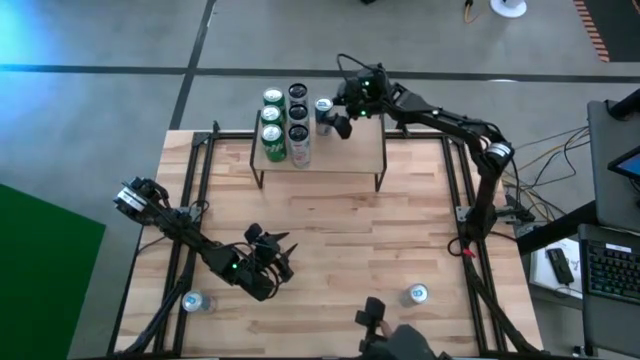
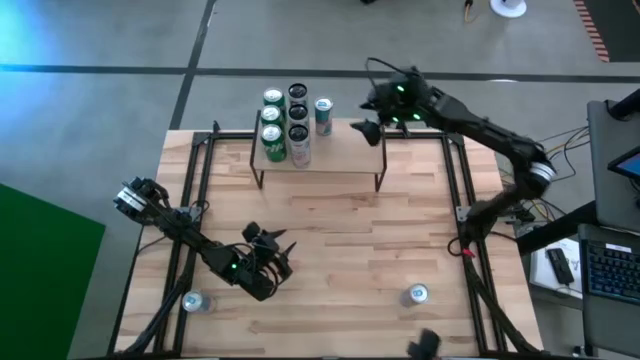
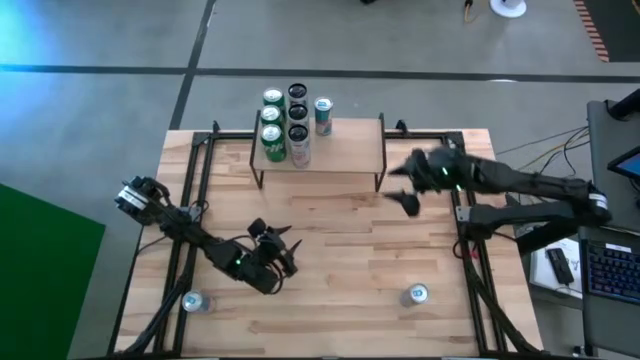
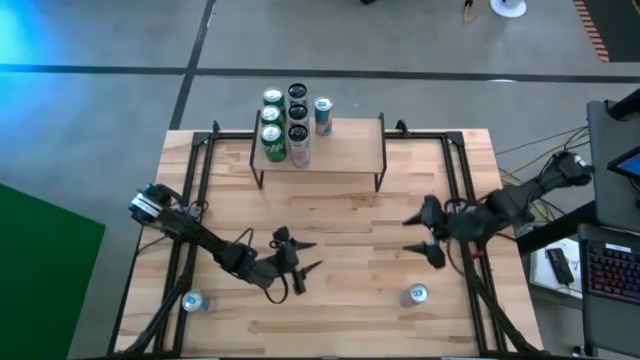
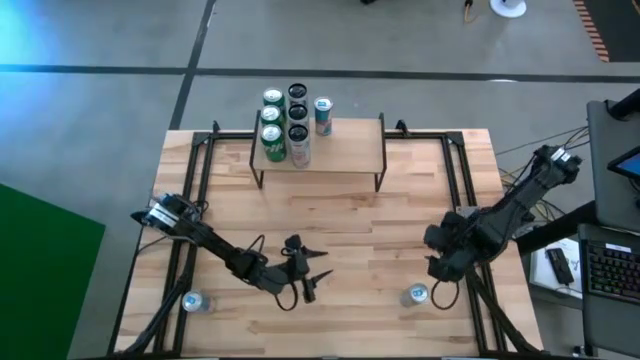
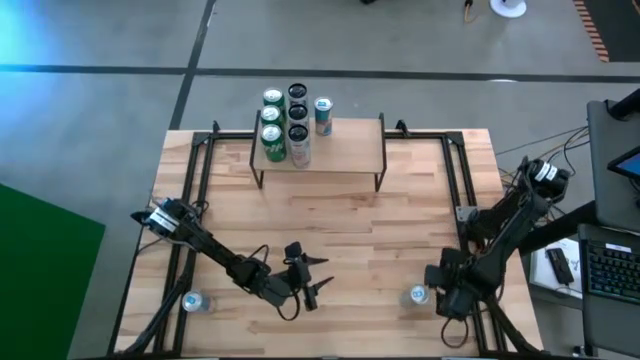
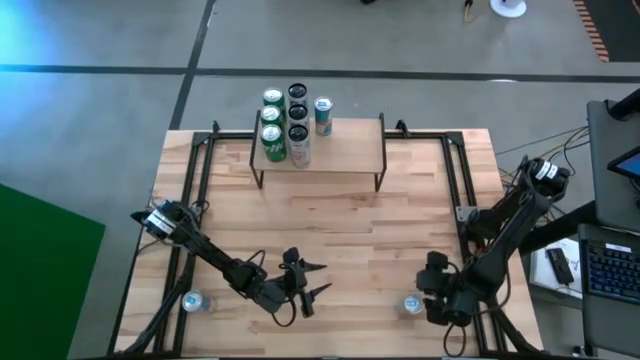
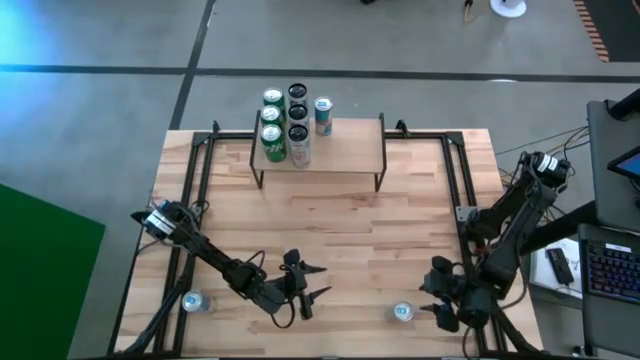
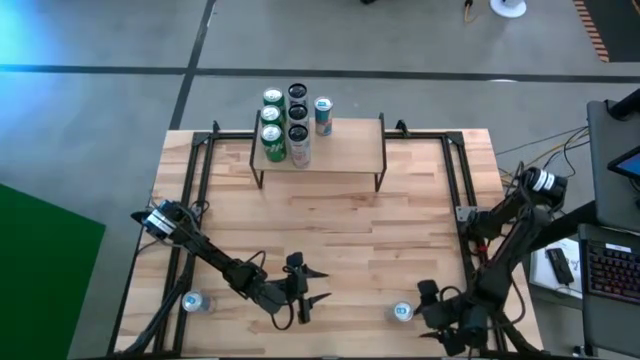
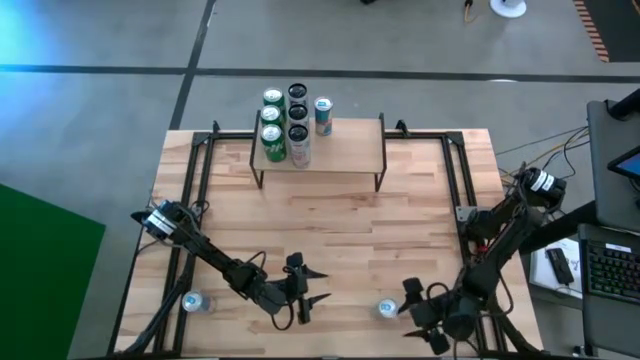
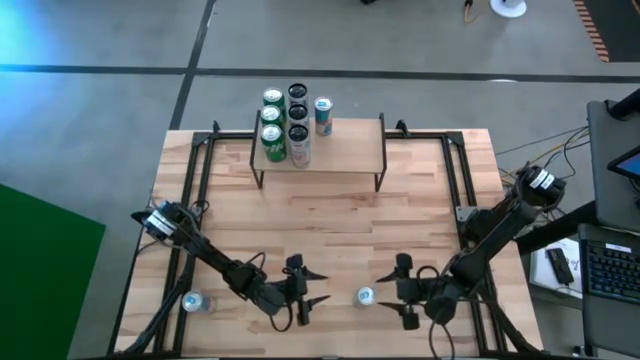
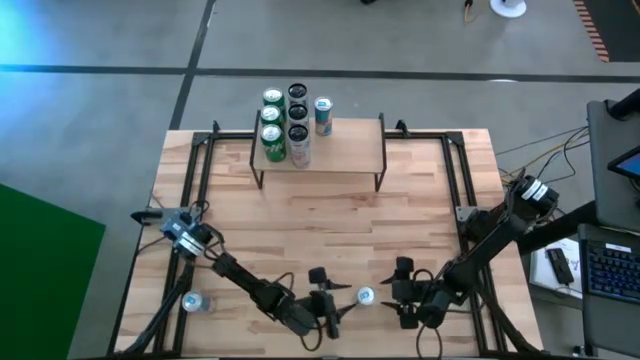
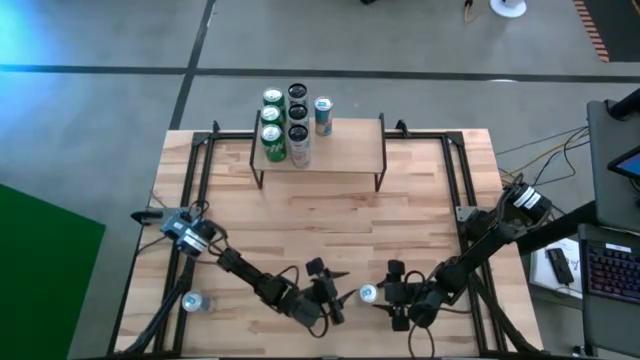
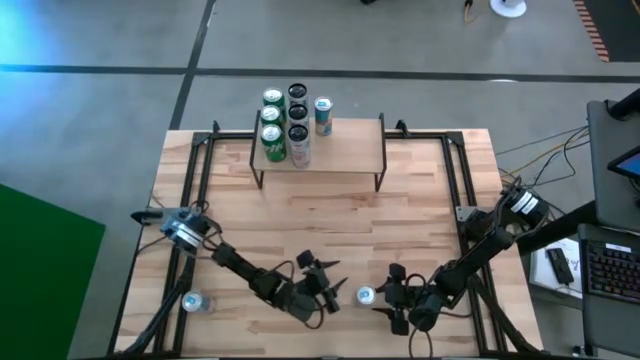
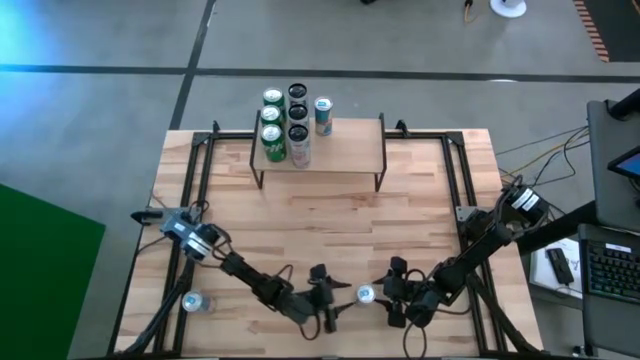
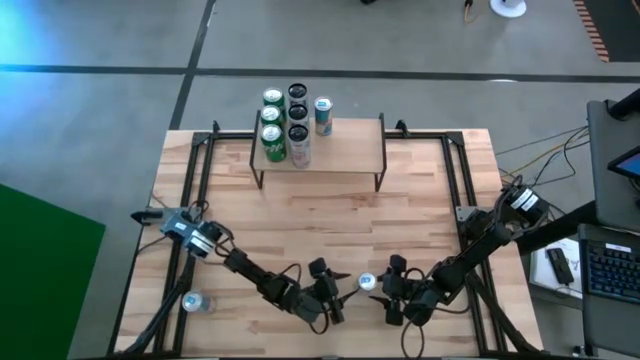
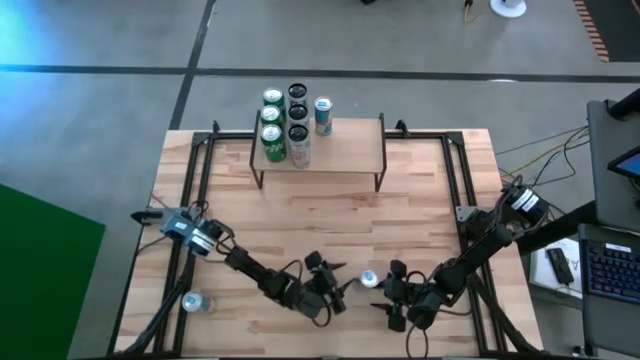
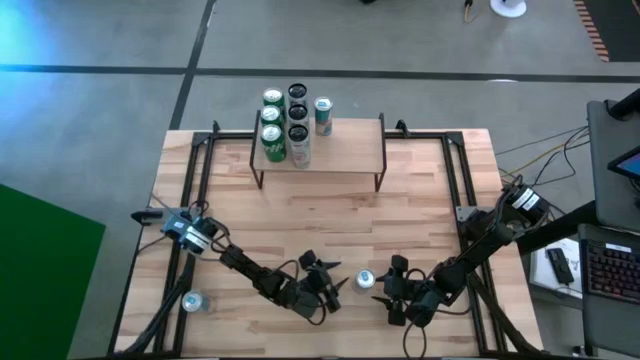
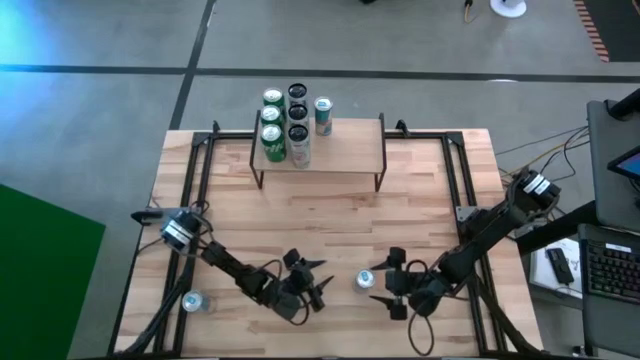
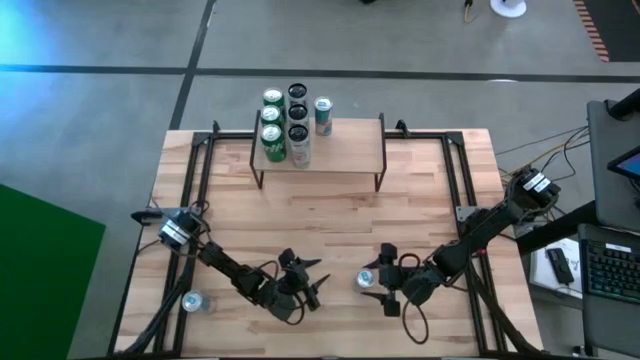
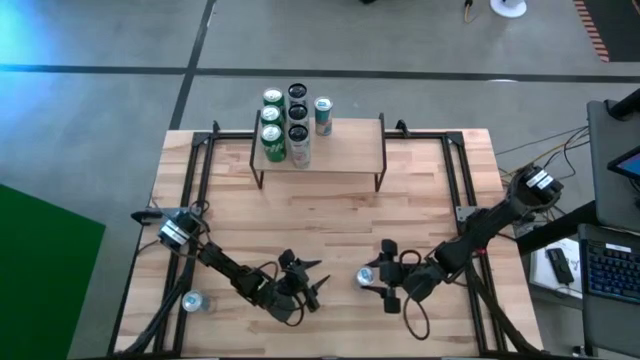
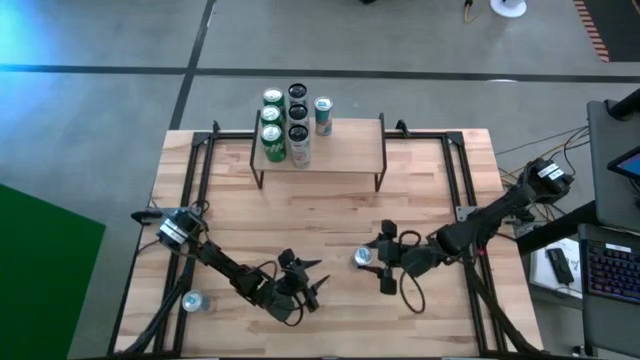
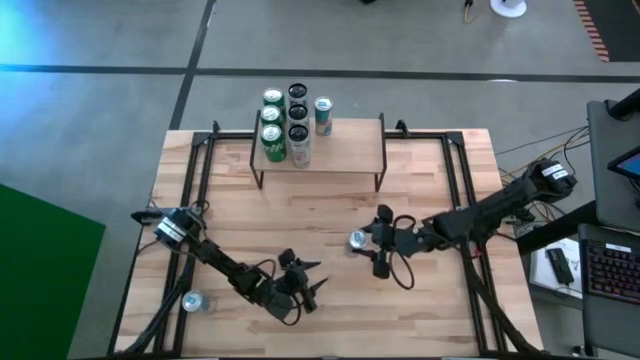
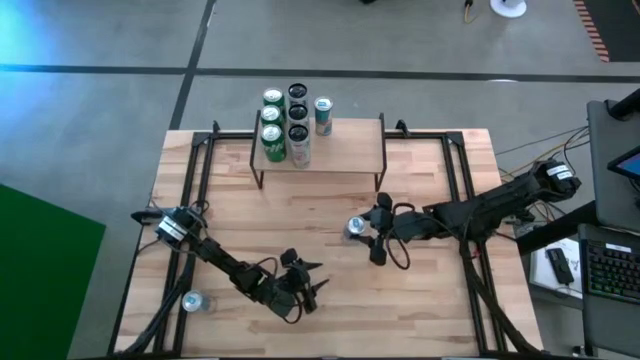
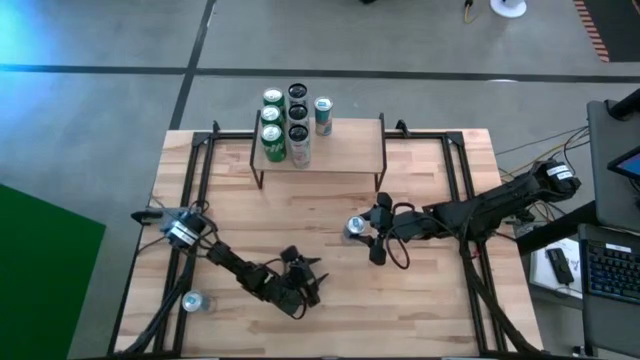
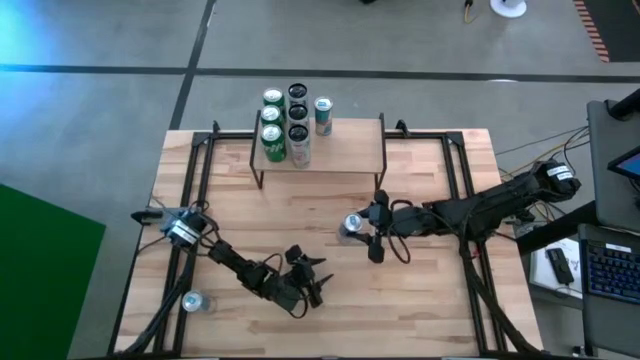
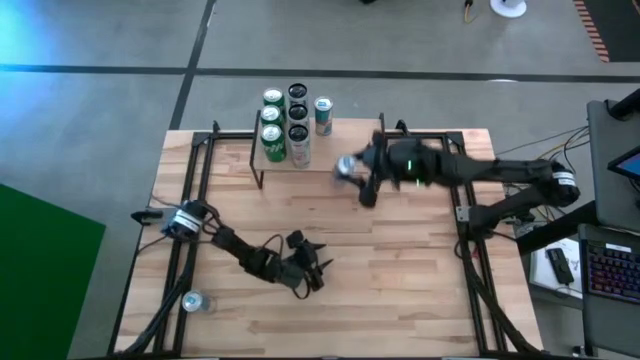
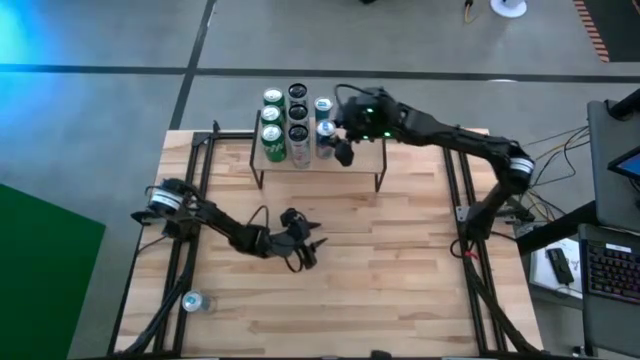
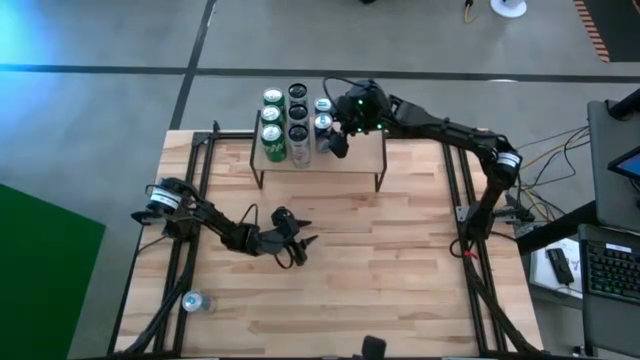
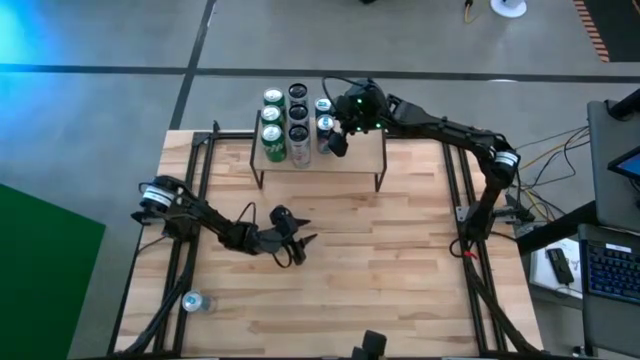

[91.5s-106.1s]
Task: Place canned beverage on shelf
Put the right blue soda can on the shelf aligned with other blue soda cans

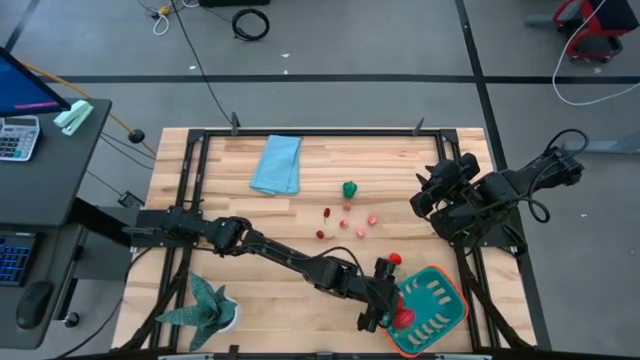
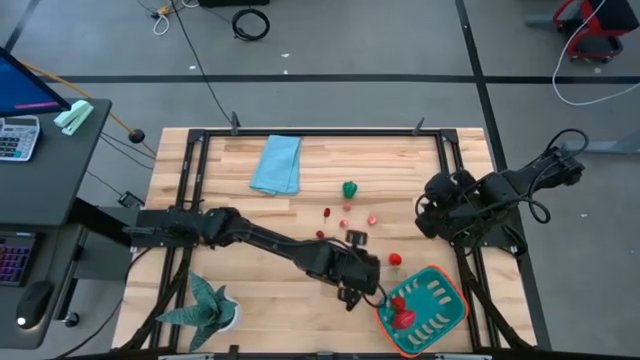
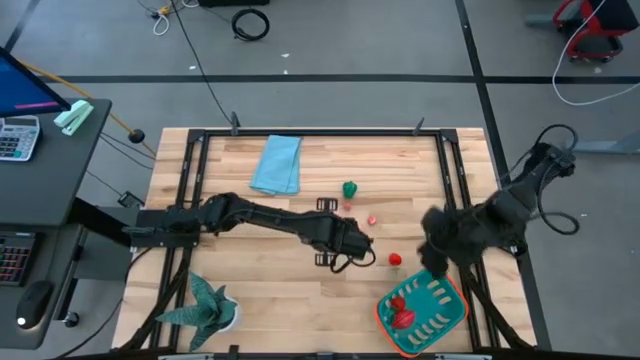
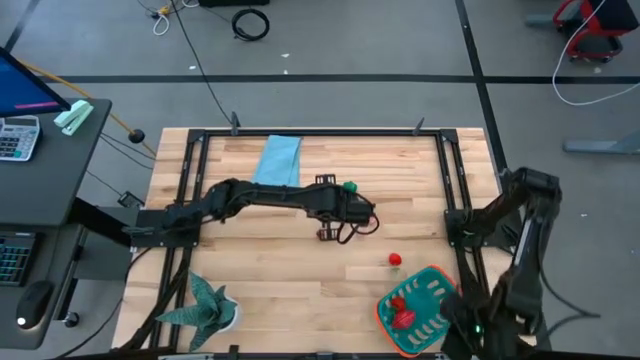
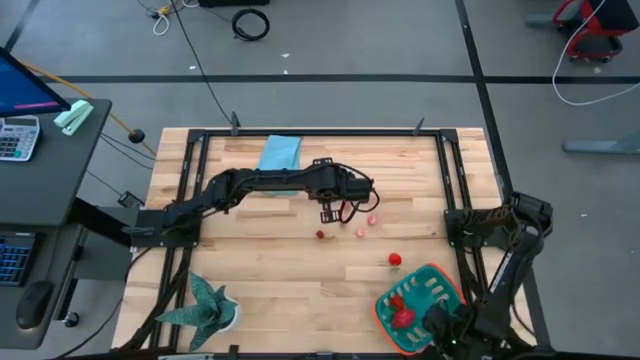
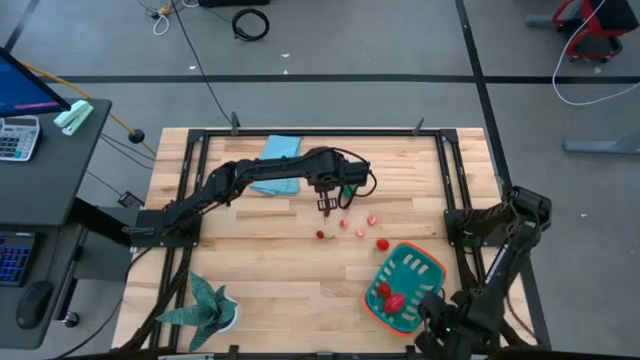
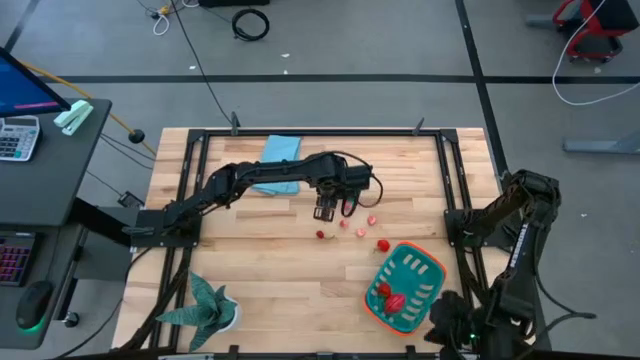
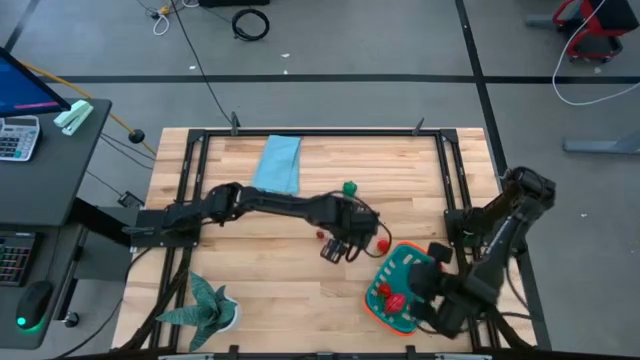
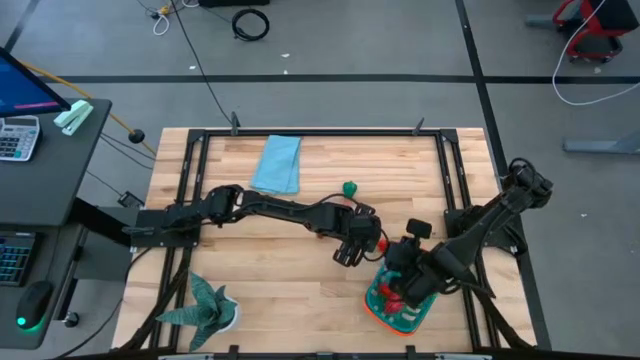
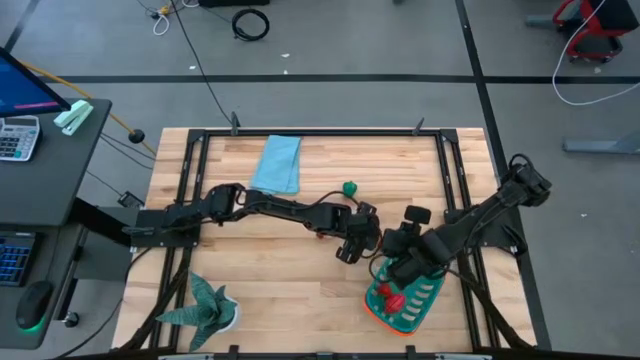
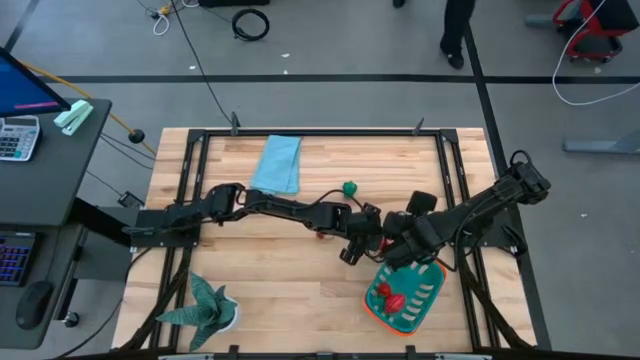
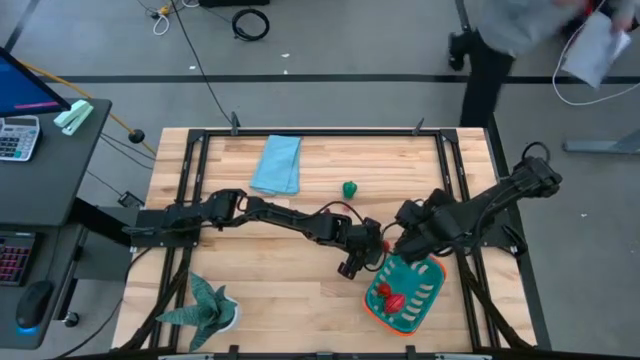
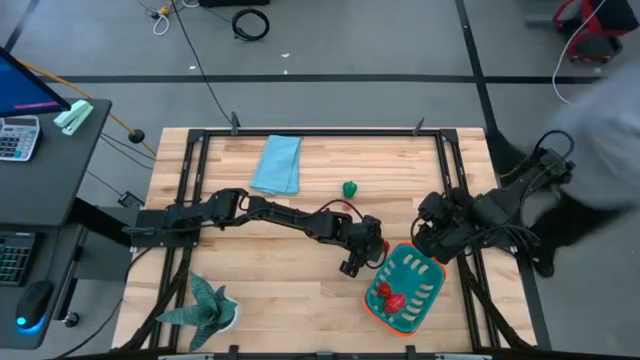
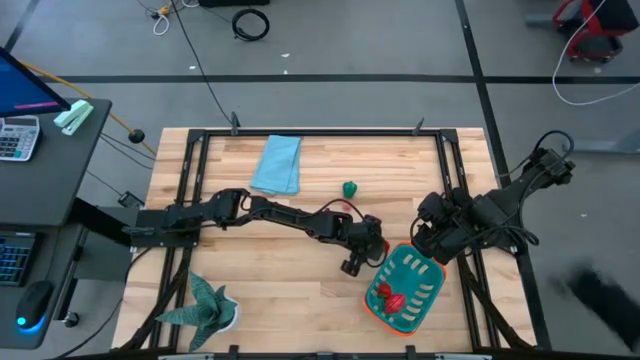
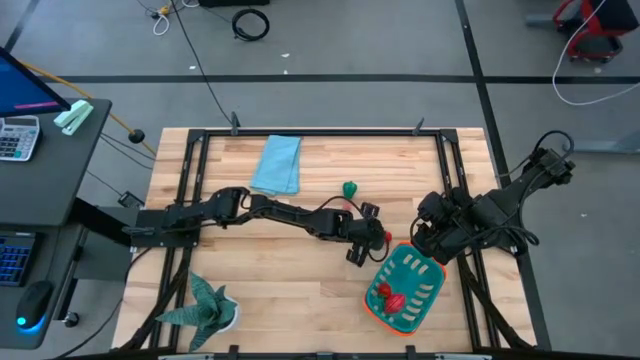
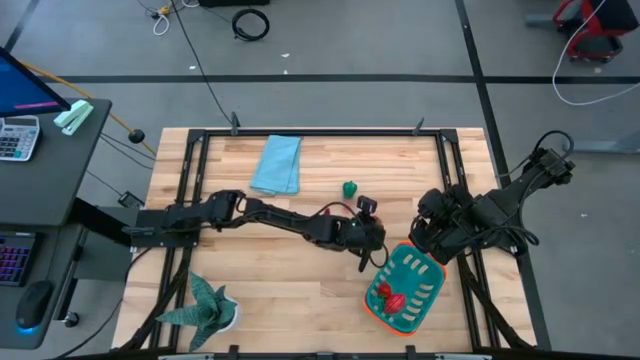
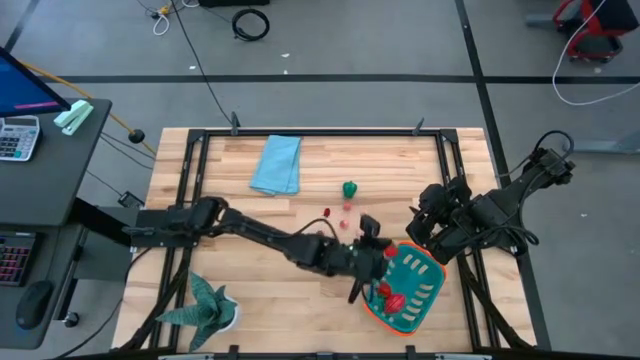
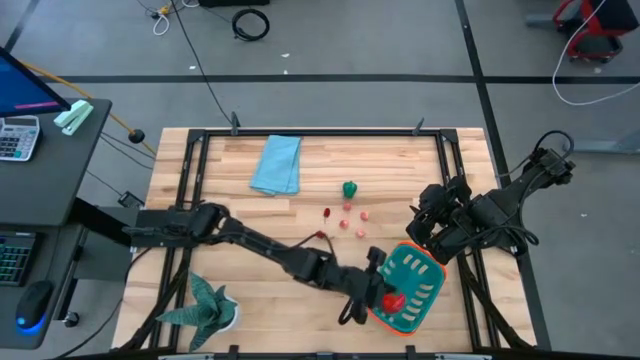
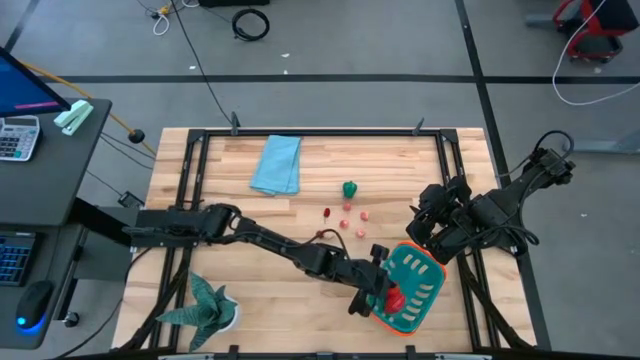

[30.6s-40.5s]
Task: Pick and placing Produce into tupperware
Put the red strawberry into the blue basket
